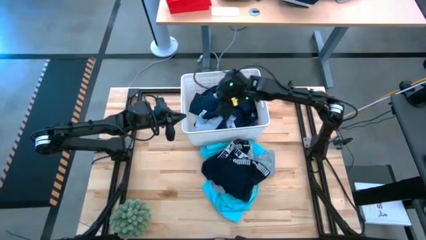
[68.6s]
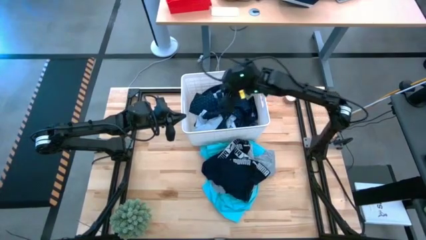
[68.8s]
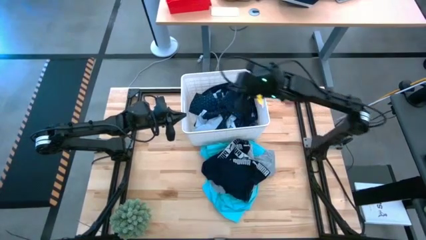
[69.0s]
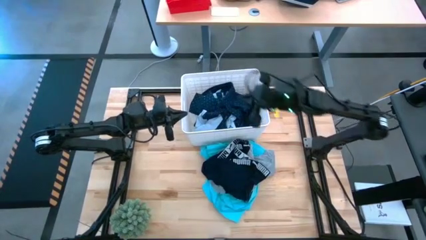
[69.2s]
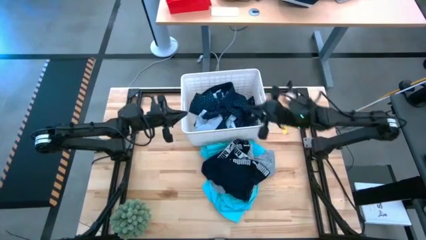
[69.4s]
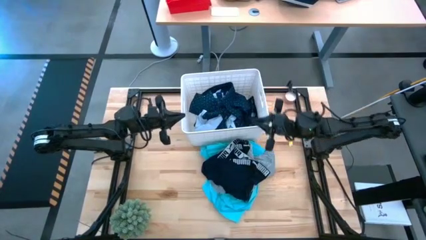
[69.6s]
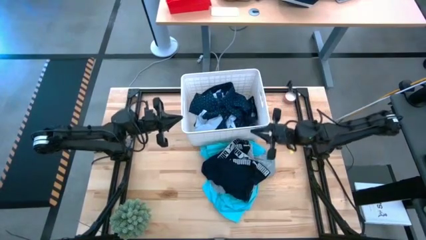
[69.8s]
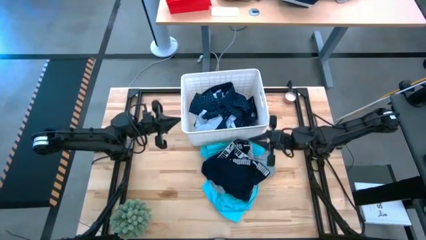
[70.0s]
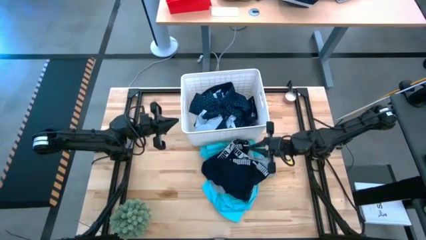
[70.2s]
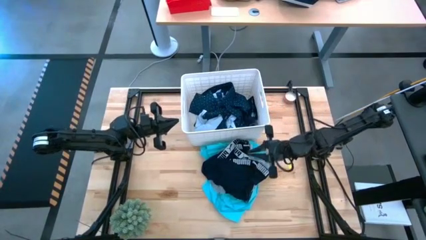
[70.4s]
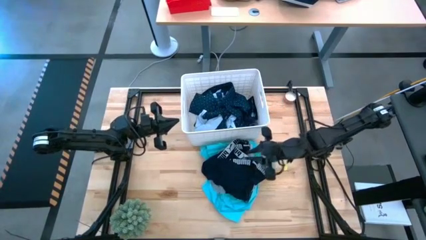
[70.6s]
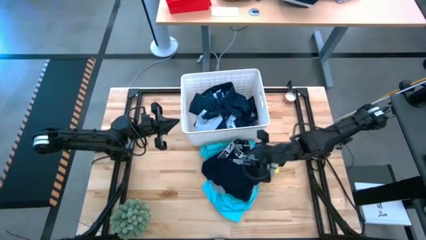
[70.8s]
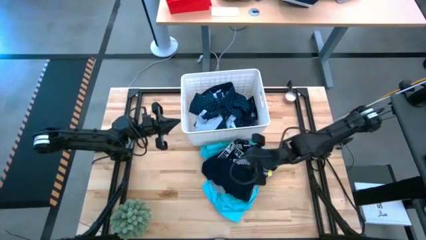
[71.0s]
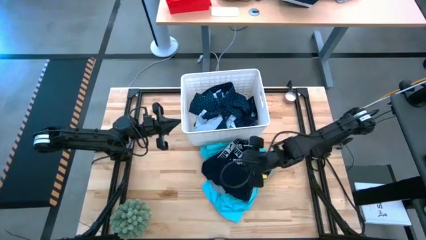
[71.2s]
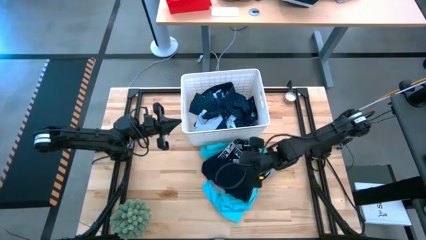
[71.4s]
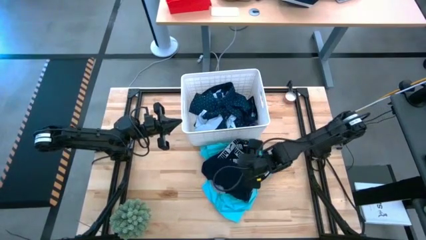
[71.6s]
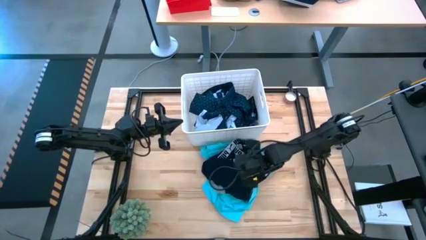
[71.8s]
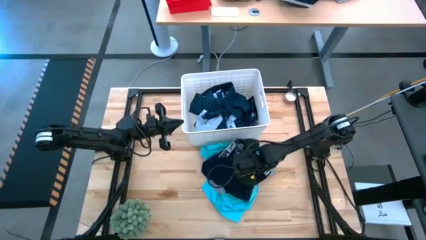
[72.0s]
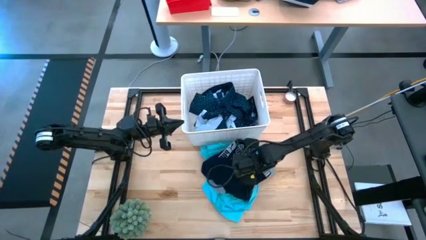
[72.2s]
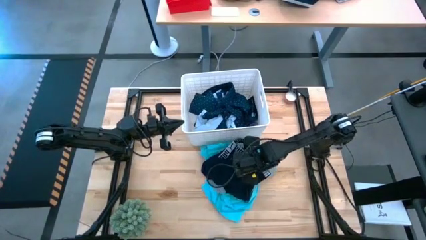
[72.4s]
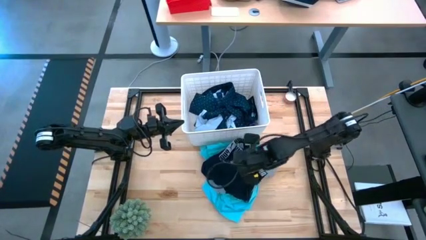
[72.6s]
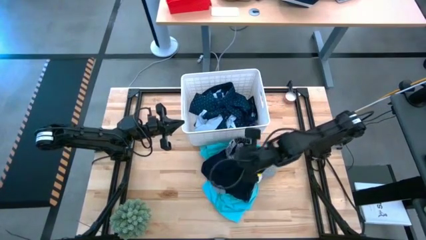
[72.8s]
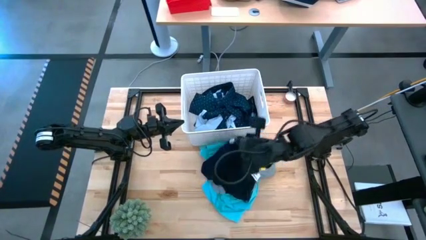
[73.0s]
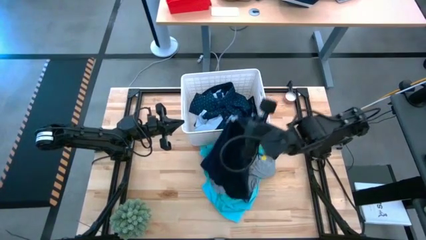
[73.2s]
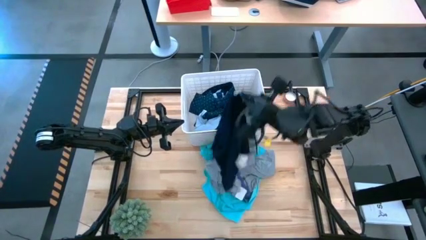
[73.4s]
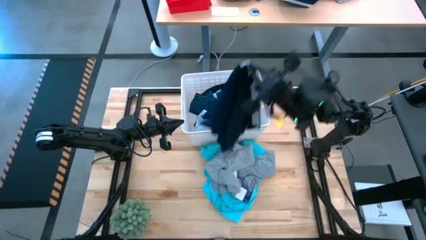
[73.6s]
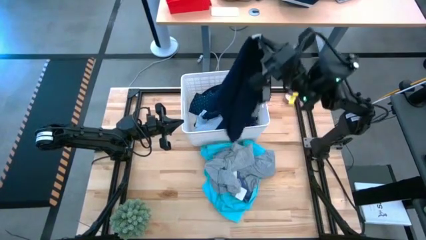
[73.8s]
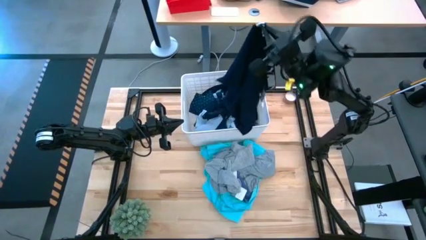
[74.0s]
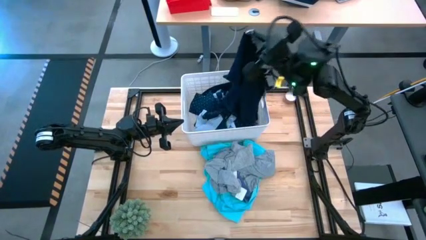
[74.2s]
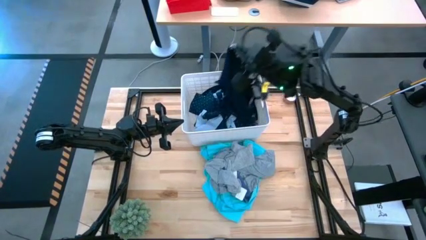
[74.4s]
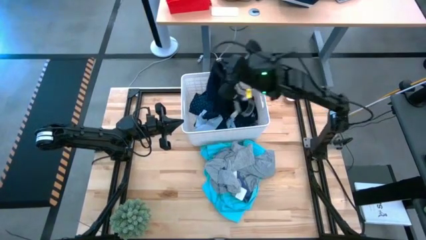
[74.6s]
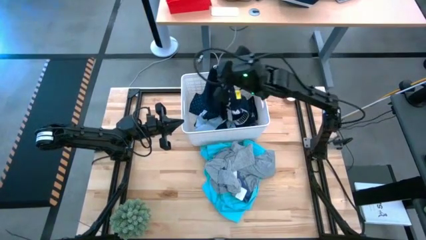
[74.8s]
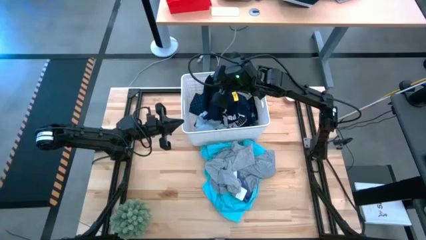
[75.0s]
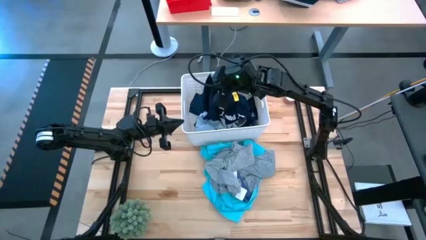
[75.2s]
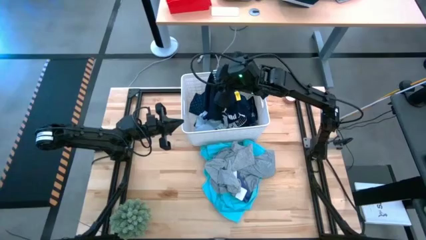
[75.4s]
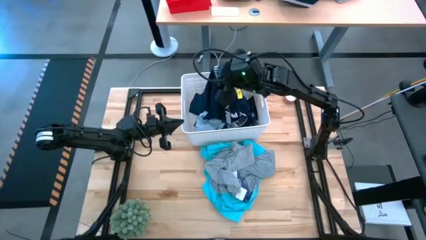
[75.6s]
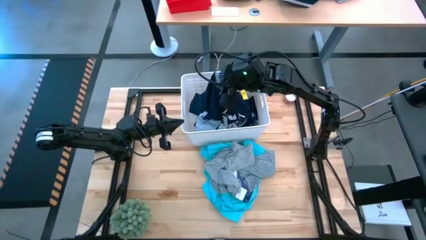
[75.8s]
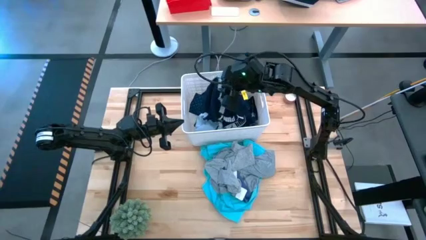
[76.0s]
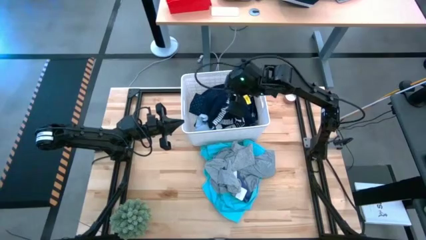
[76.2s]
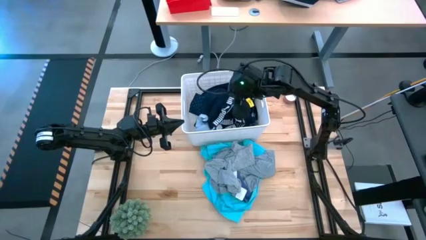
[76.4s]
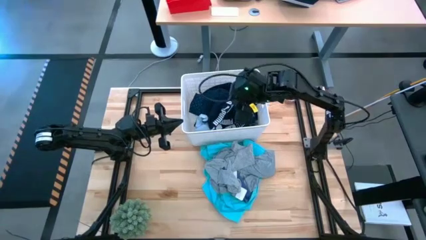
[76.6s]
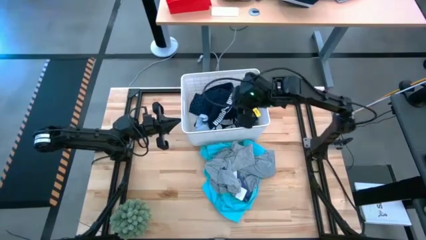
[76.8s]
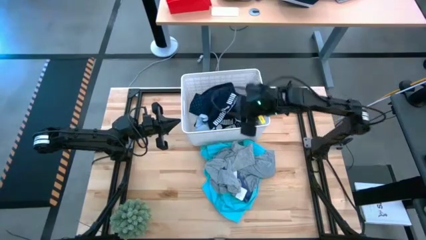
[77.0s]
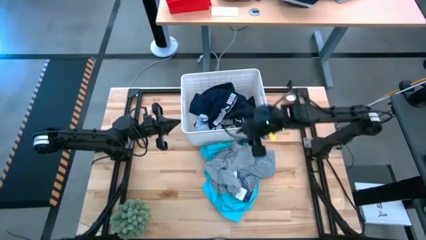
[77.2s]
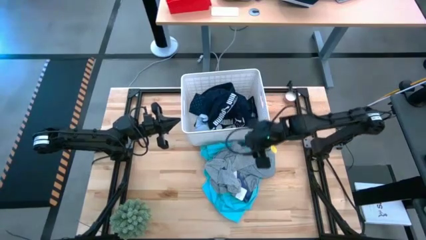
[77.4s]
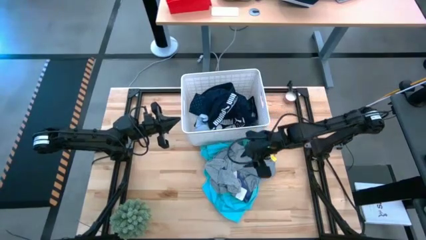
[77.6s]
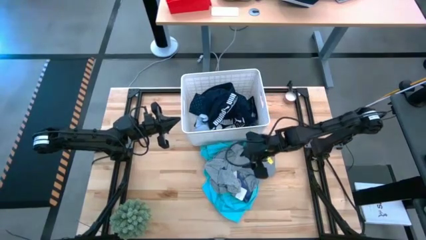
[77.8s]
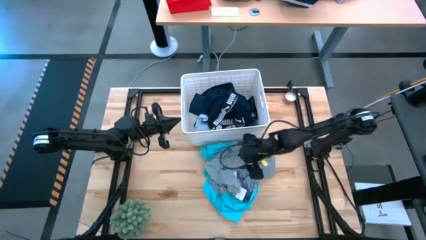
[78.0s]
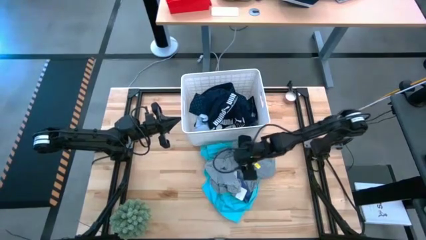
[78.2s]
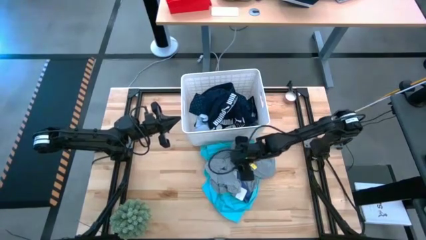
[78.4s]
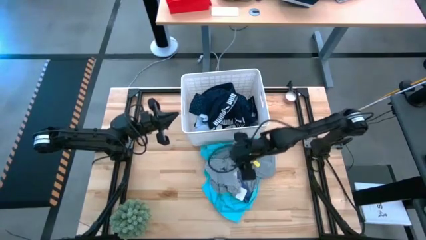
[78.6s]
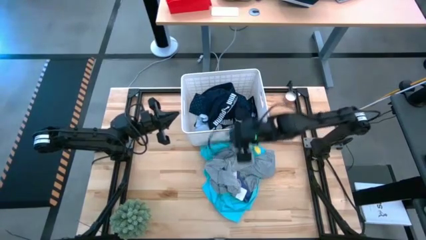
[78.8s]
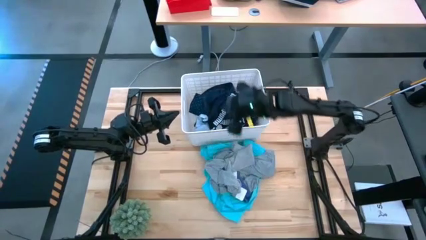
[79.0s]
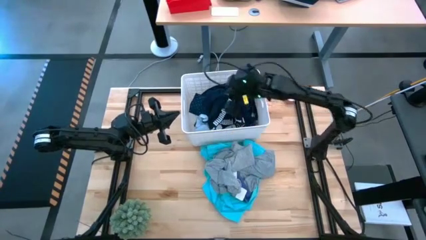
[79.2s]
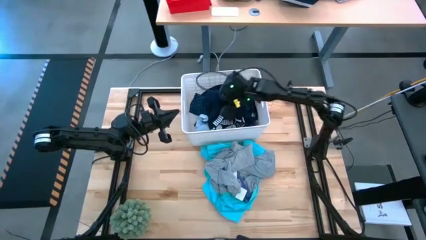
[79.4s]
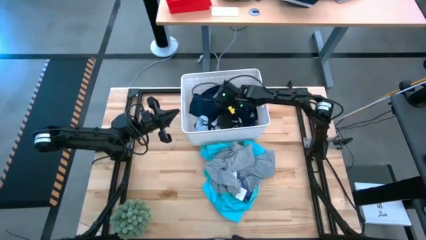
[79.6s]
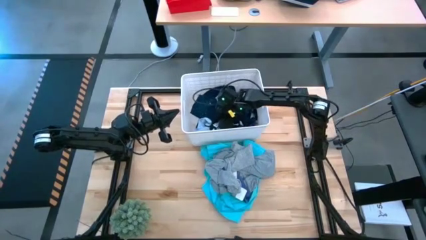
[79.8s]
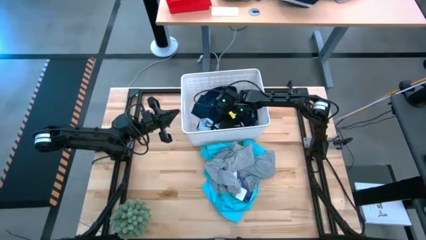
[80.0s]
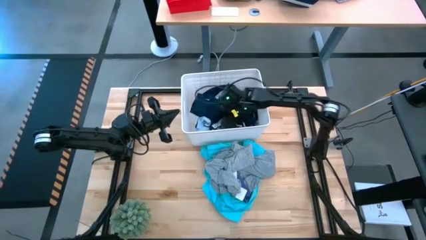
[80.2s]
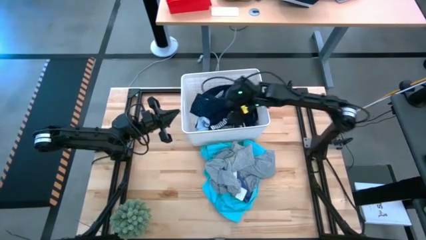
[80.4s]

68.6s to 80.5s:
Task: Sort clothes
Put the black boxers into the white bin

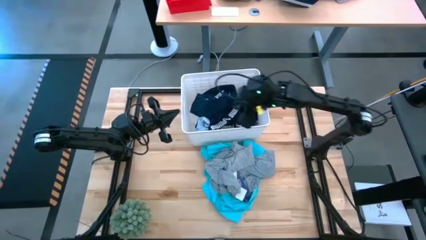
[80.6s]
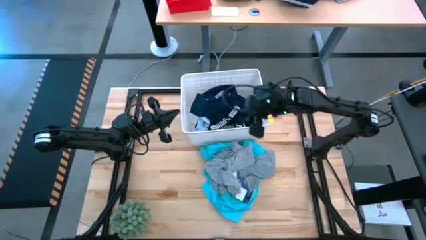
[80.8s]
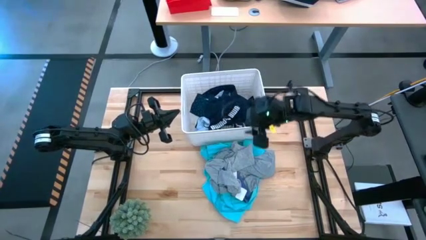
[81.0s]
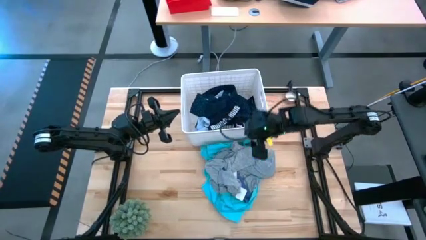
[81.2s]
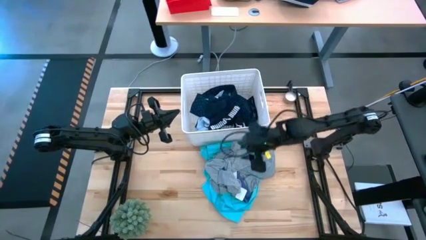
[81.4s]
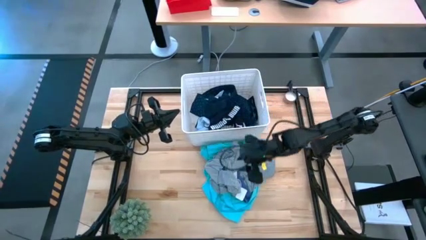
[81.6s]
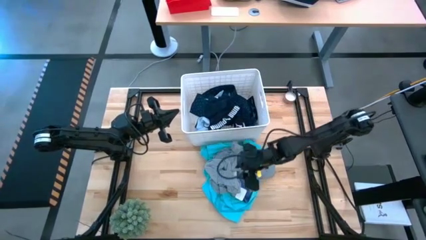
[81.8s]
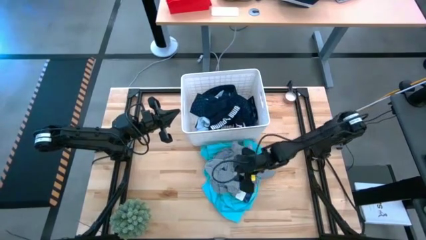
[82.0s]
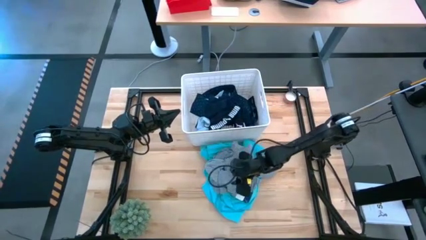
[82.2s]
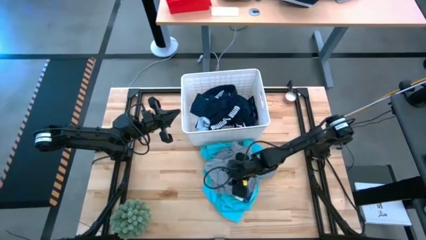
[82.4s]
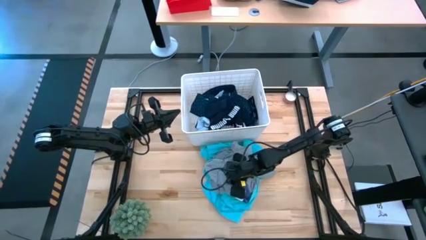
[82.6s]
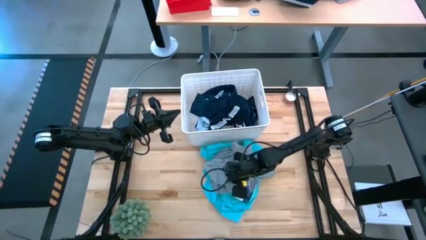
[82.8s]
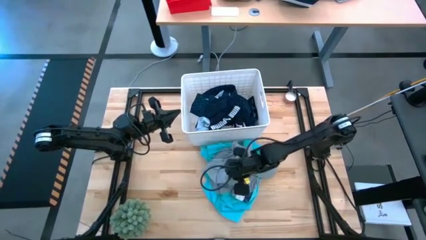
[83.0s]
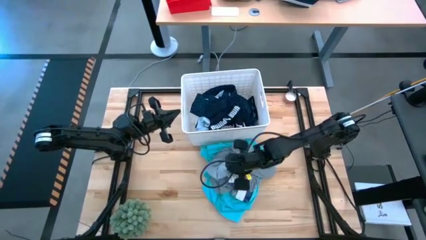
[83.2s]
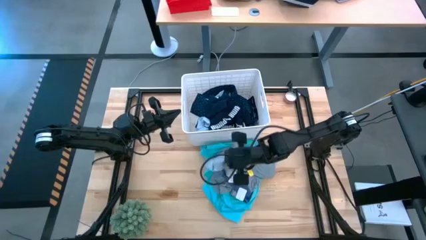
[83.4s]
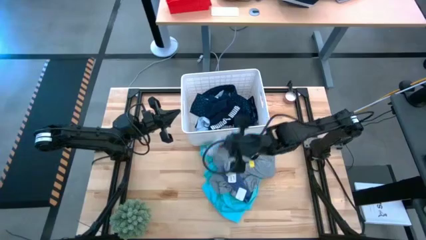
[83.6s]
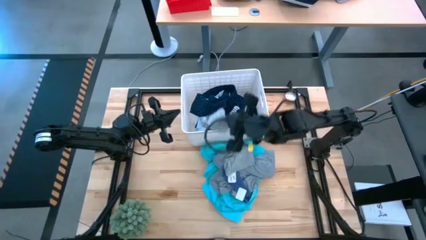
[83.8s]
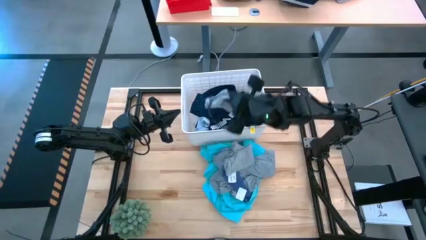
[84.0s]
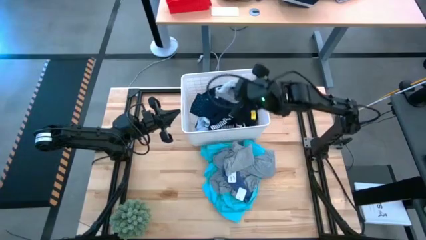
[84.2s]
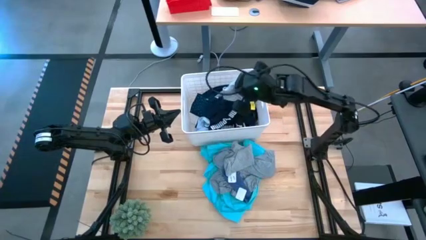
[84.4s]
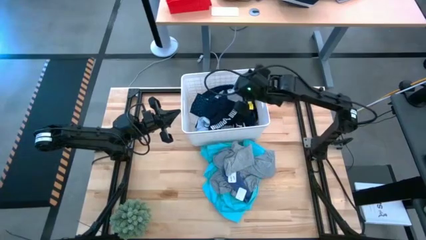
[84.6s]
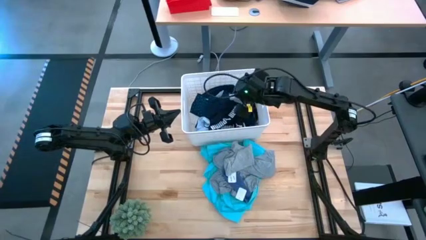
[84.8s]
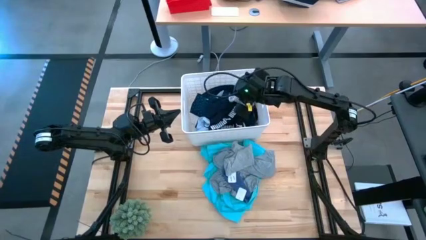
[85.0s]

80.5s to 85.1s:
Put the gray socks into the white bin
